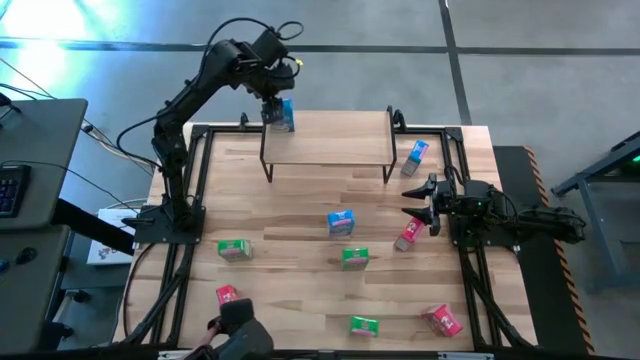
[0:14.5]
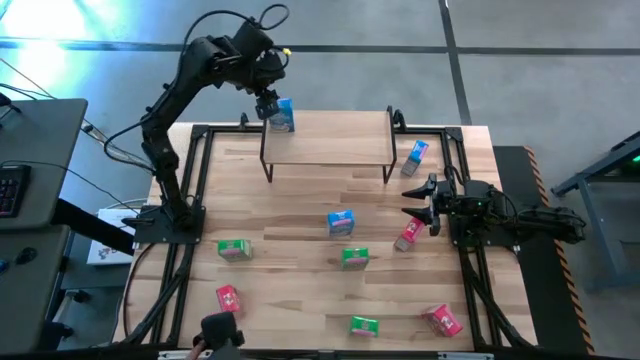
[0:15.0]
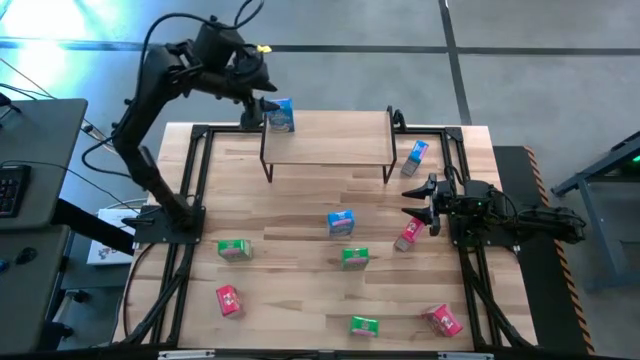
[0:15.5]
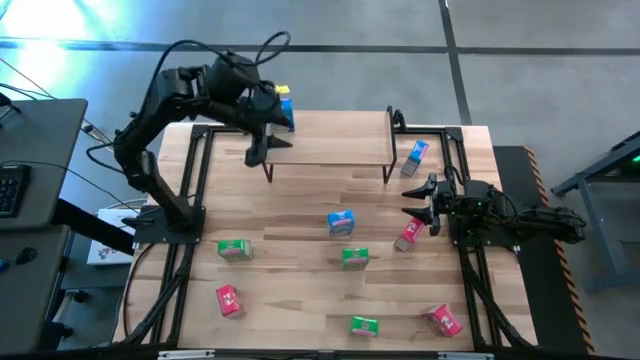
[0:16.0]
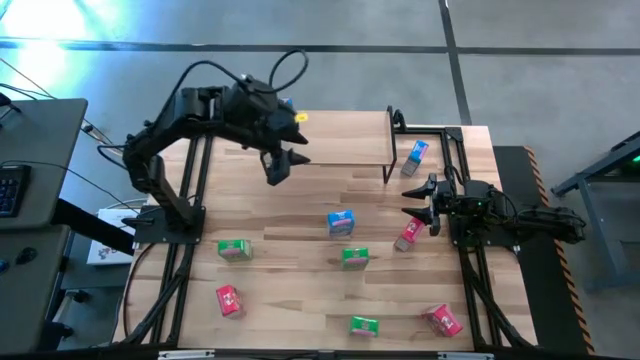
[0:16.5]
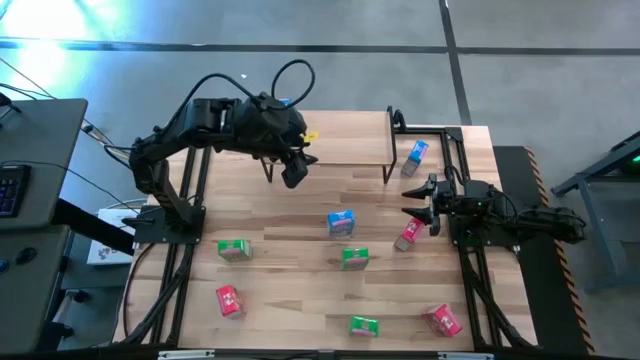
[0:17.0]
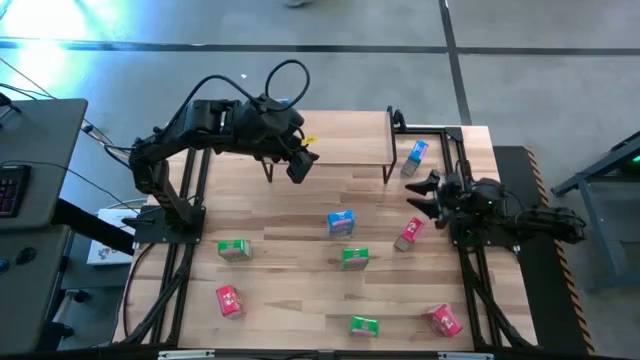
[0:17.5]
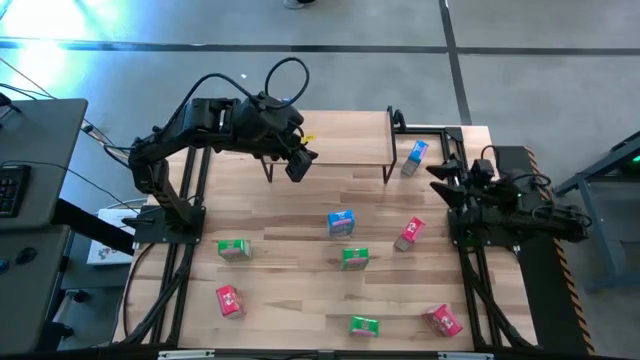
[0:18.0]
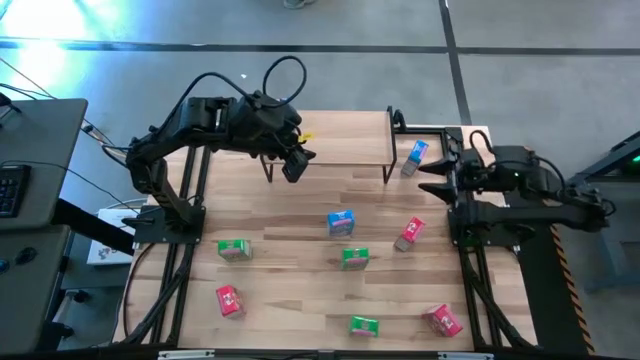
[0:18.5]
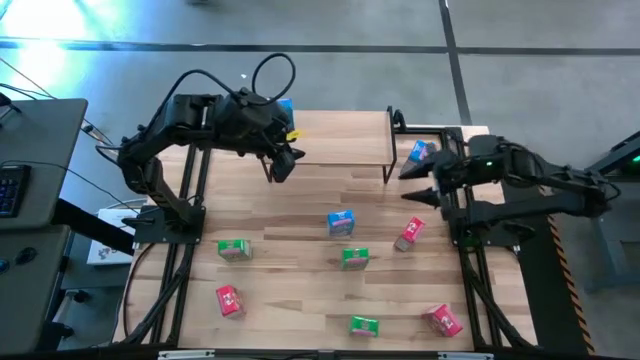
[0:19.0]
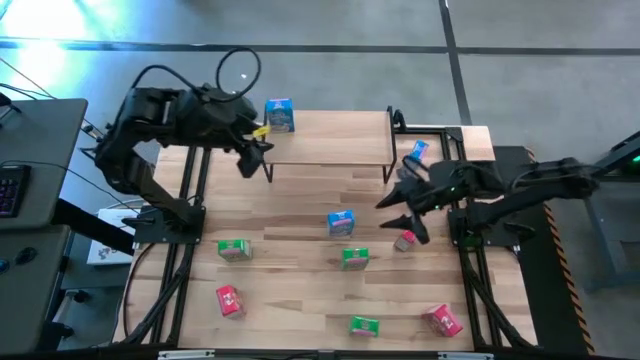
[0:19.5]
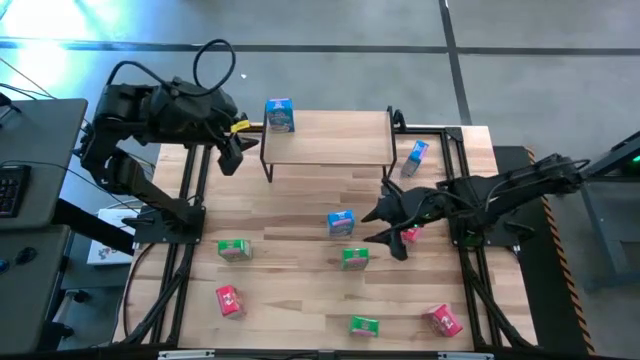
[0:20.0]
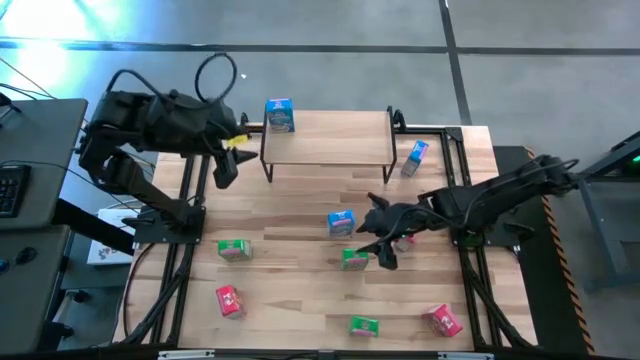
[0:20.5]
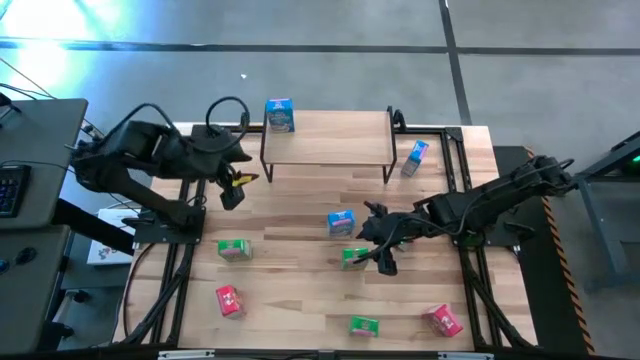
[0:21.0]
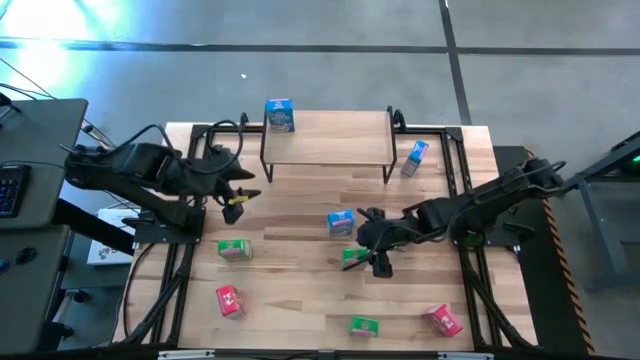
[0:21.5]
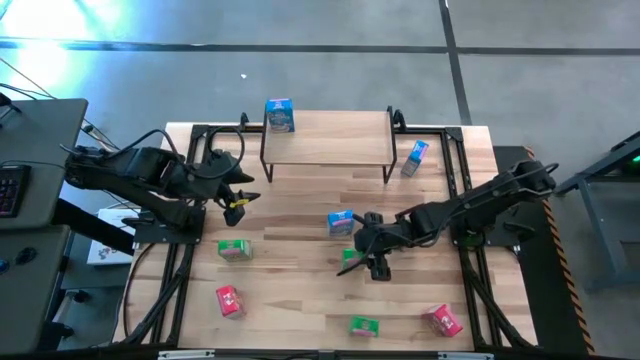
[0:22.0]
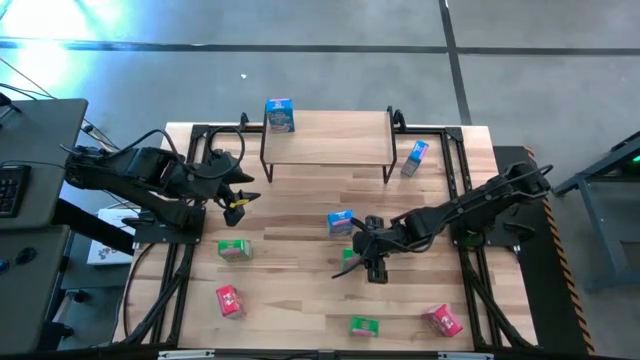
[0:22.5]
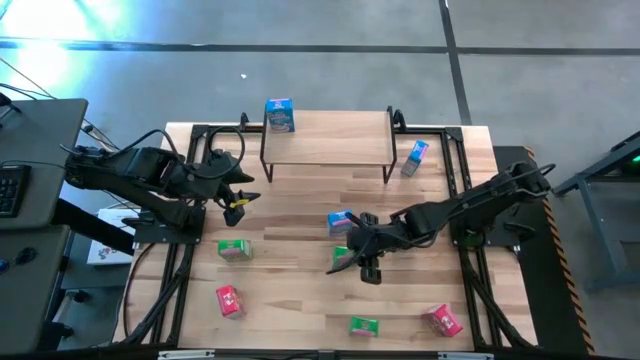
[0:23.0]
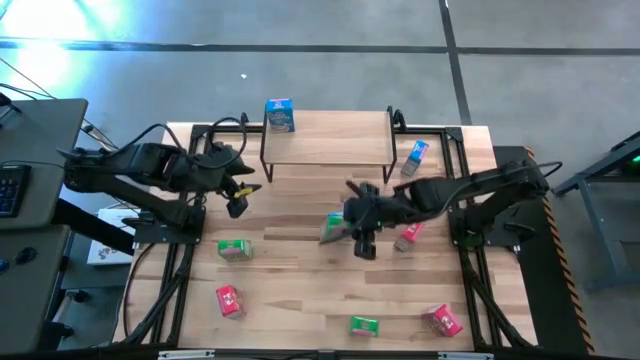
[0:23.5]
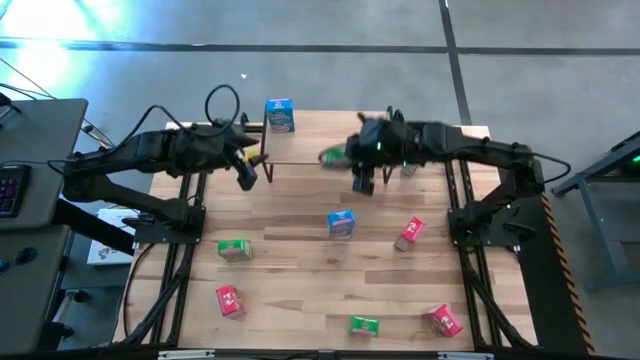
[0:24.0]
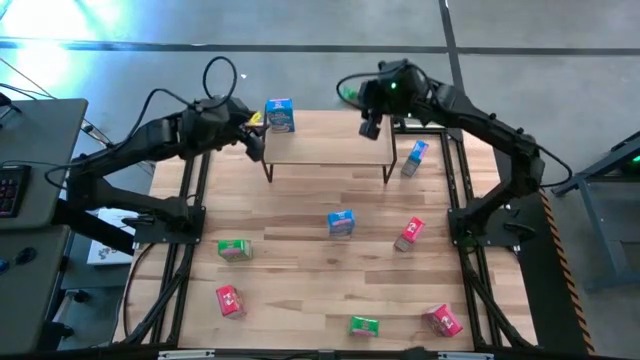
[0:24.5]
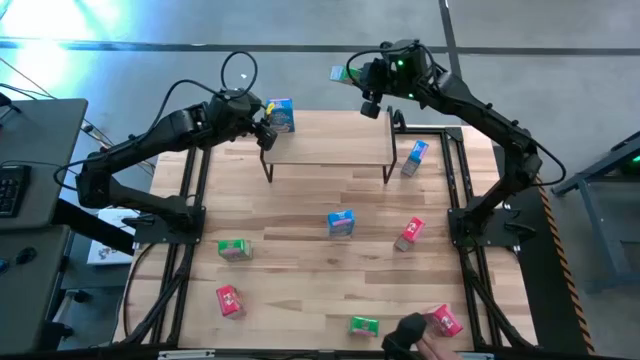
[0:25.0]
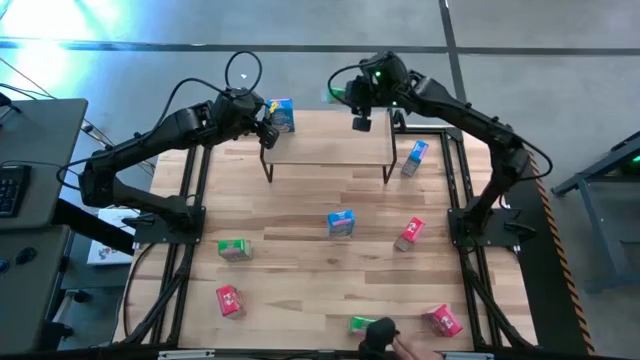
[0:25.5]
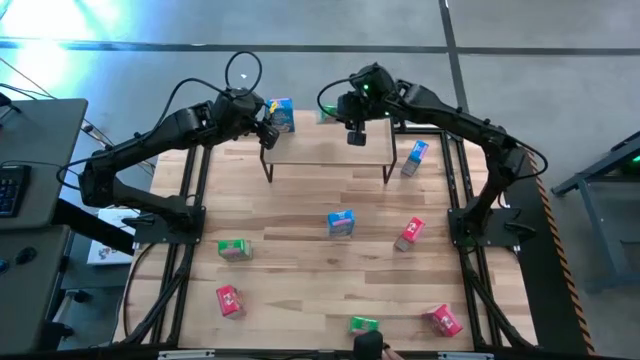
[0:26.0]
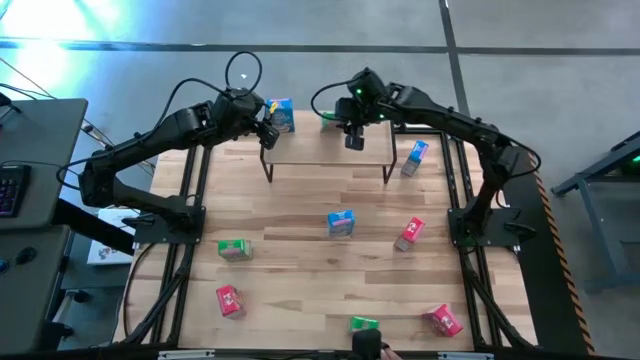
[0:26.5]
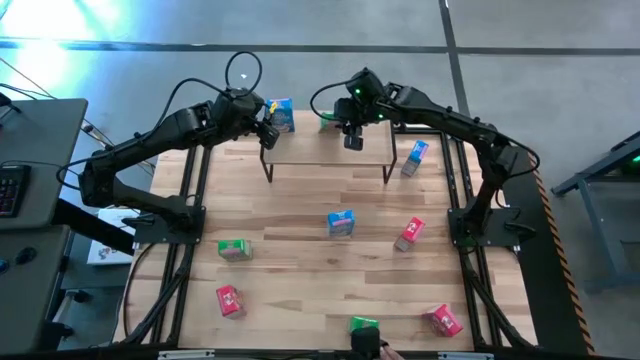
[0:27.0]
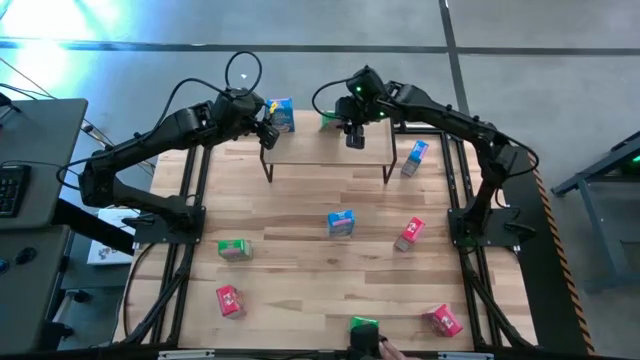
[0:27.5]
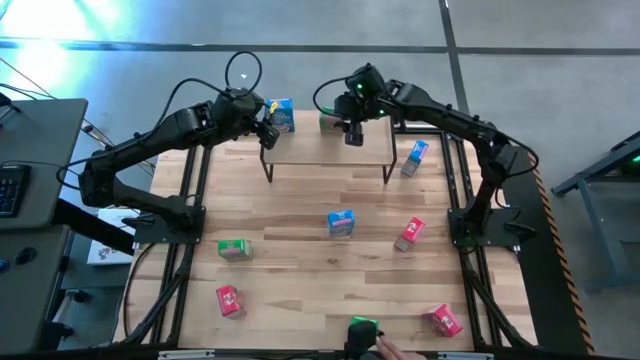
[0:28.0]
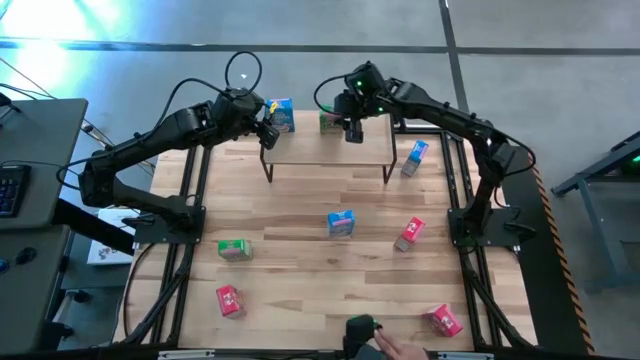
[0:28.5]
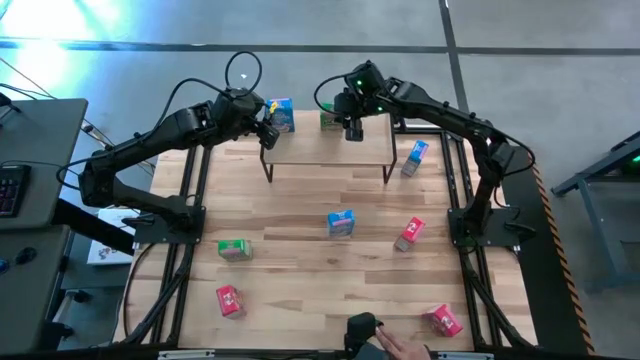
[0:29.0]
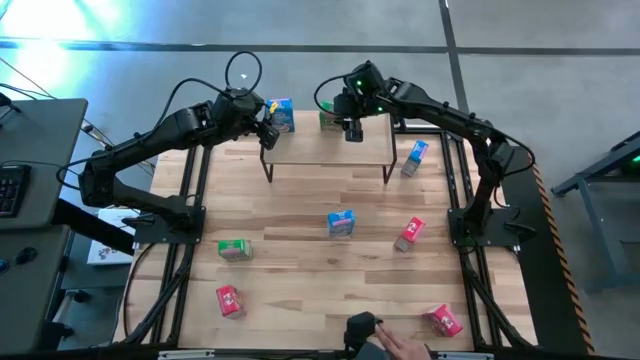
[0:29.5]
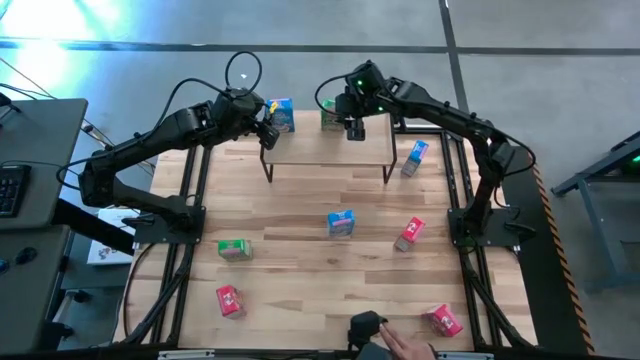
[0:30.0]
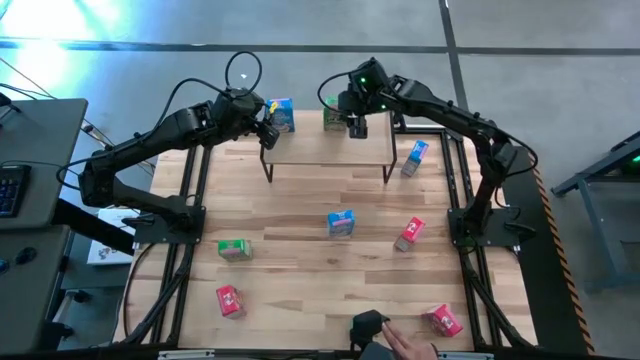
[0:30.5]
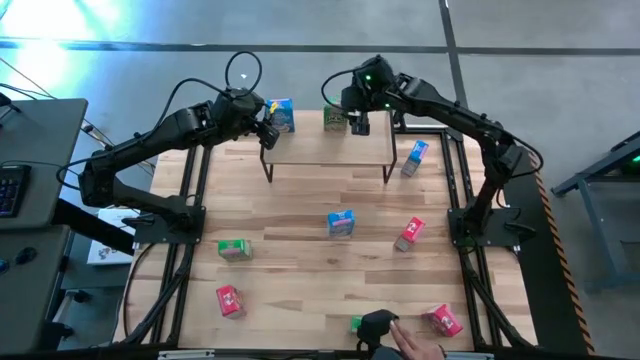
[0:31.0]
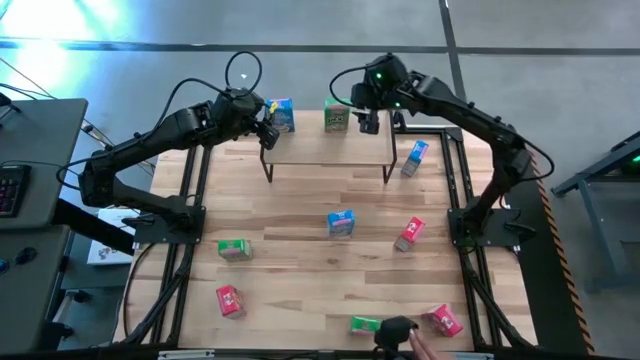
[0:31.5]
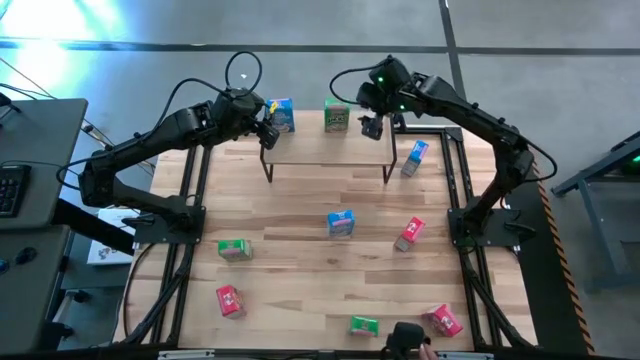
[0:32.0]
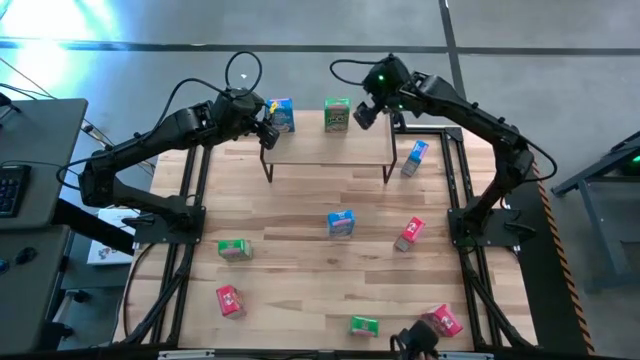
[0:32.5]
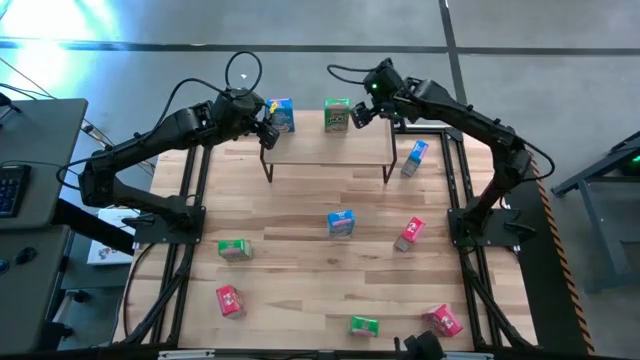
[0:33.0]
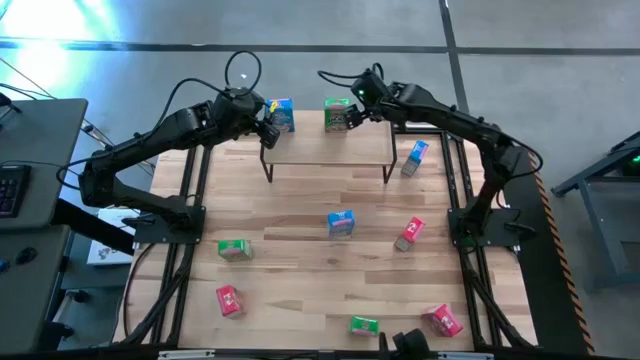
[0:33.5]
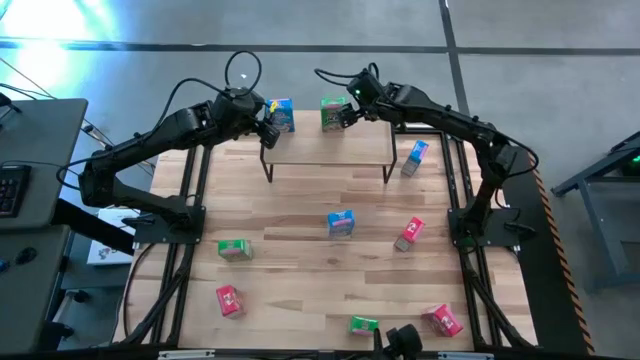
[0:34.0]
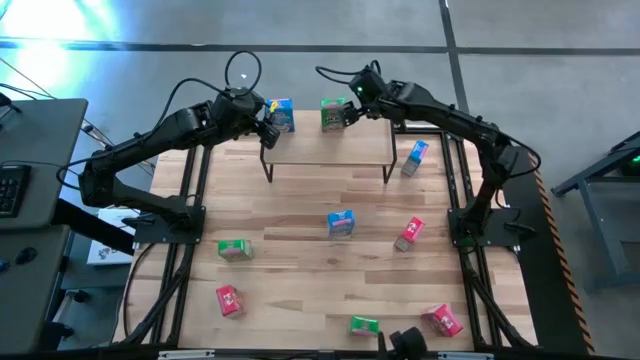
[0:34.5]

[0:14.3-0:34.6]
Task: Stack cereal on shelf
Put the top right green cereal box on the shelf
